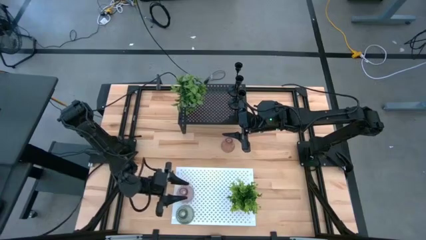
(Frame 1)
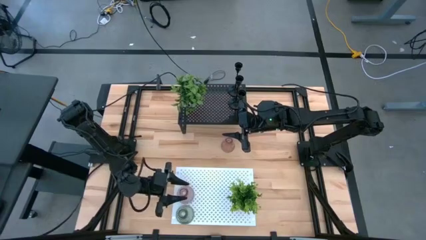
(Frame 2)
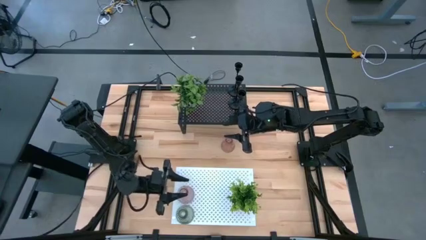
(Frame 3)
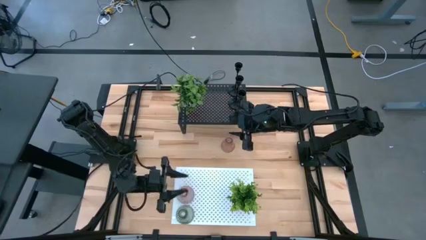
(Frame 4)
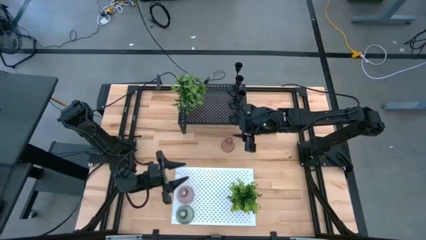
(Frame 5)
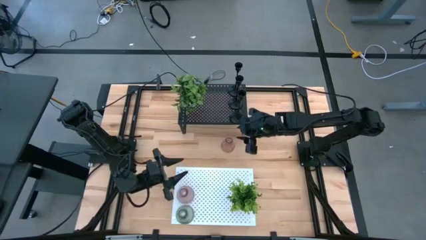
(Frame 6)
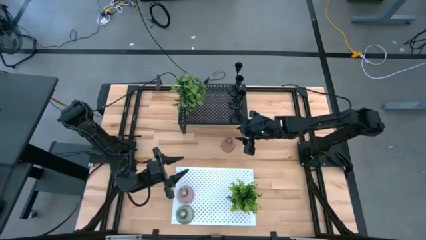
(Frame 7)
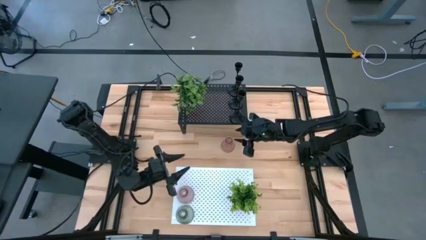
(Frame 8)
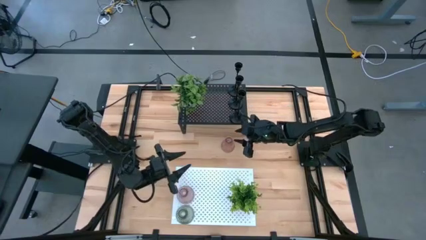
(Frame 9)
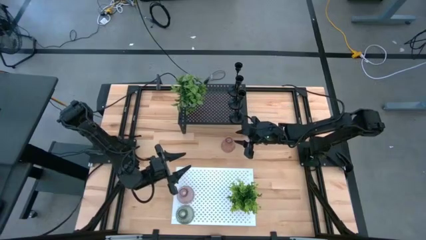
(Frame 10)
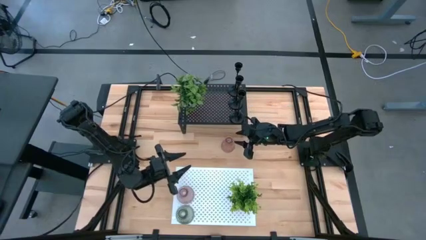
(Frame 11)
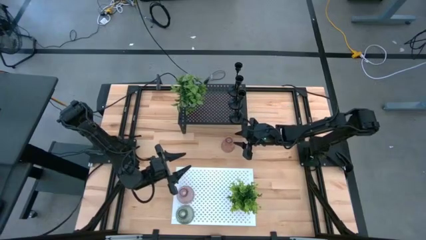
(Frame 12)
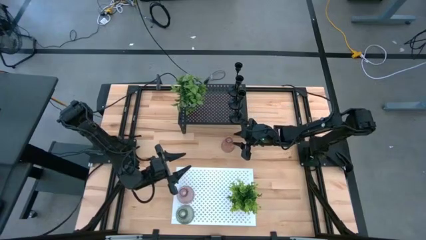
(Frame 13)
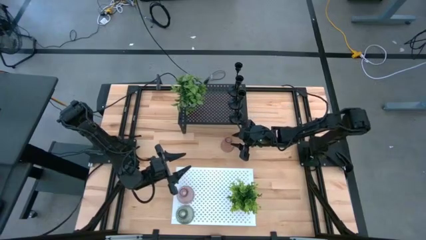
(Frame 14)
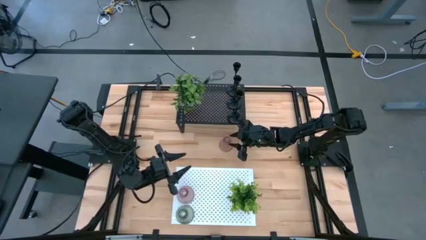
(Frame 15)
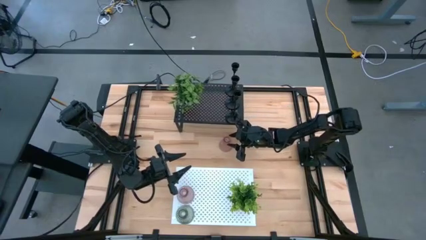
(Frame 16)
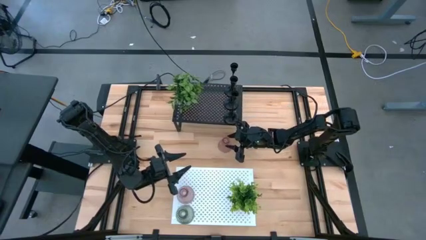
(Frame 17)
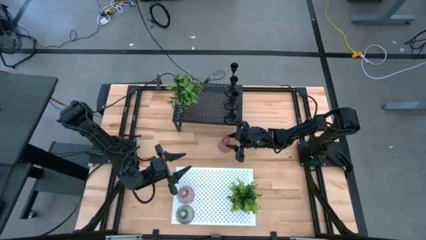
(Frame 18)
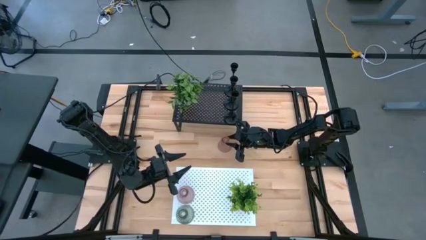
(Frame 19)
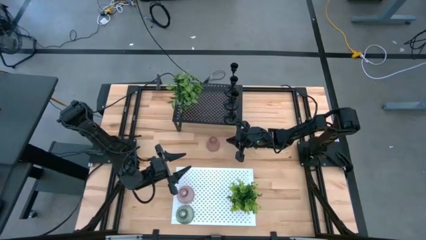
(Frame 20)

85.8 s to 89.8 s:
Task: Pick & Place candle stick holders
Put the small pink glass candle holder on the white shelf aligned with the other small pink glass candle holder

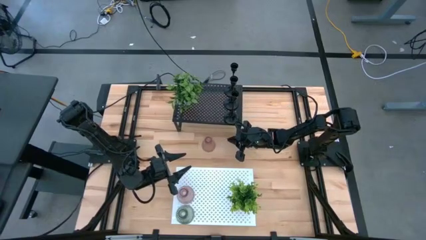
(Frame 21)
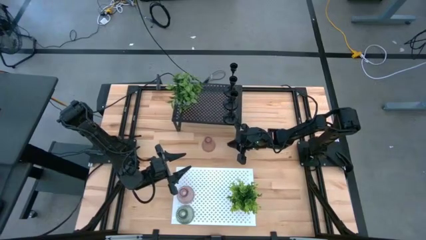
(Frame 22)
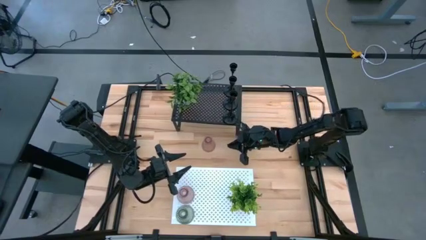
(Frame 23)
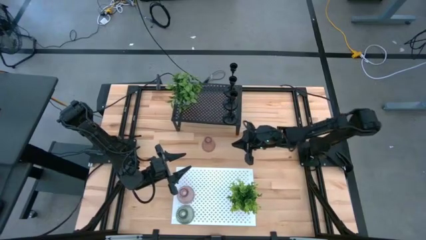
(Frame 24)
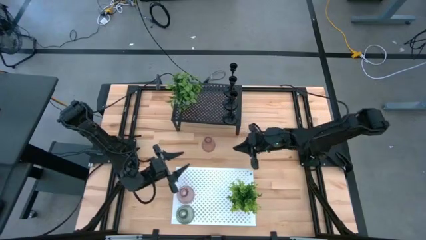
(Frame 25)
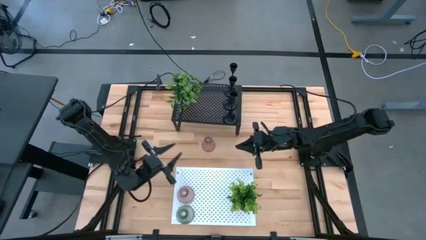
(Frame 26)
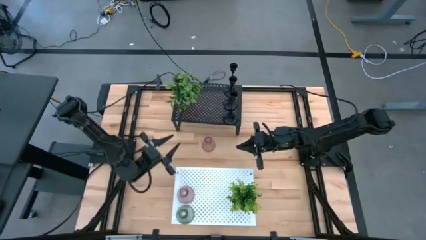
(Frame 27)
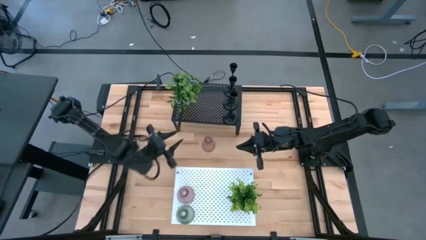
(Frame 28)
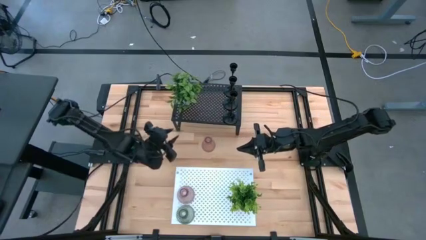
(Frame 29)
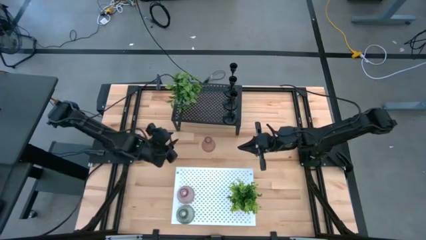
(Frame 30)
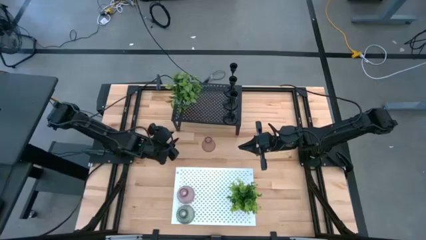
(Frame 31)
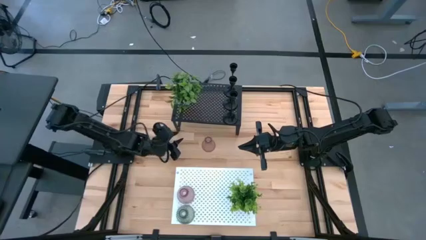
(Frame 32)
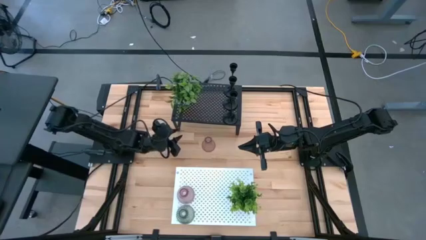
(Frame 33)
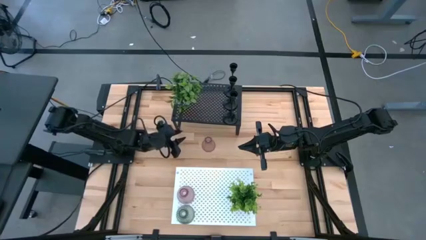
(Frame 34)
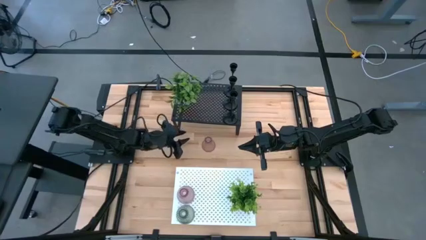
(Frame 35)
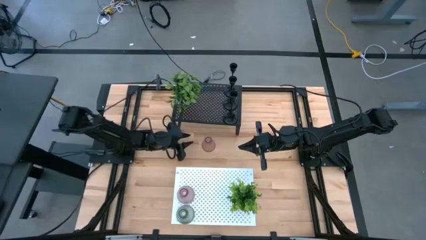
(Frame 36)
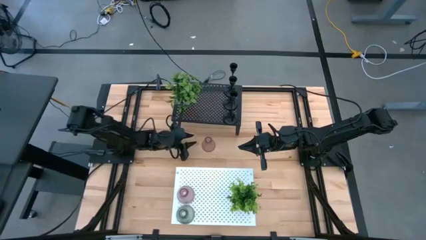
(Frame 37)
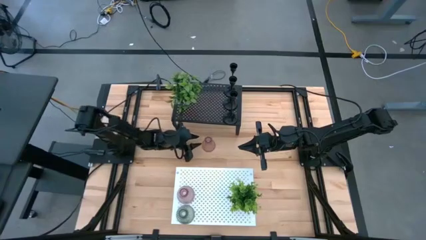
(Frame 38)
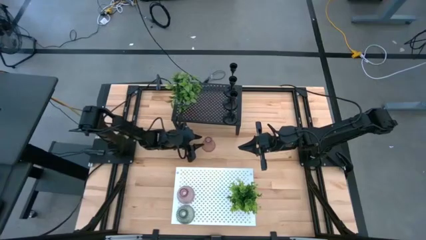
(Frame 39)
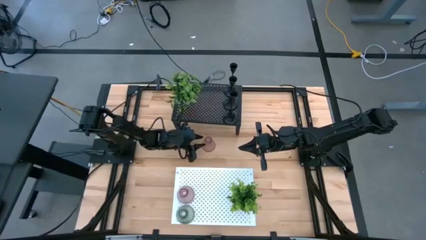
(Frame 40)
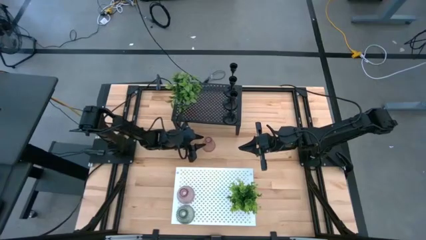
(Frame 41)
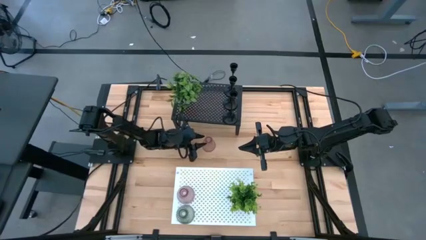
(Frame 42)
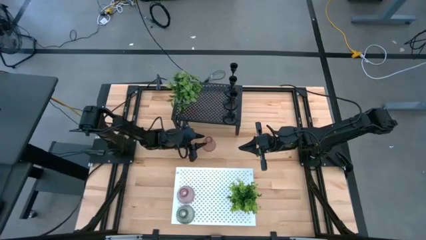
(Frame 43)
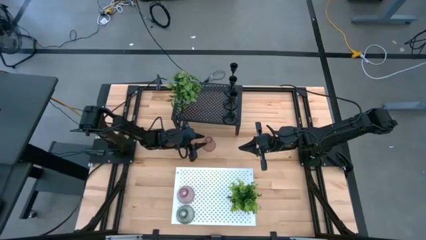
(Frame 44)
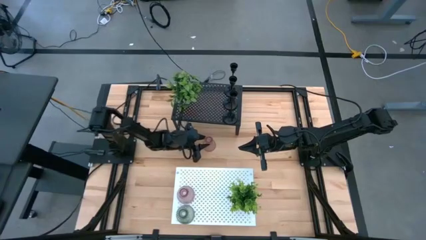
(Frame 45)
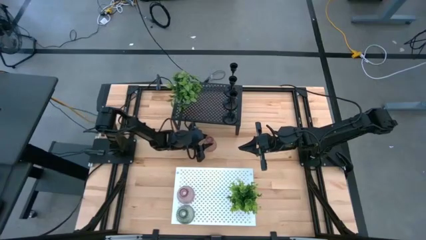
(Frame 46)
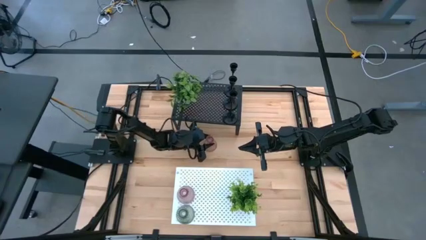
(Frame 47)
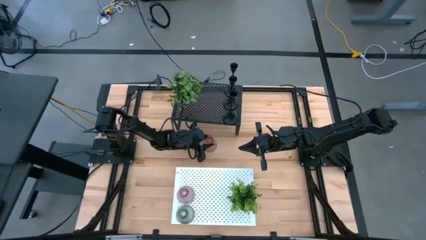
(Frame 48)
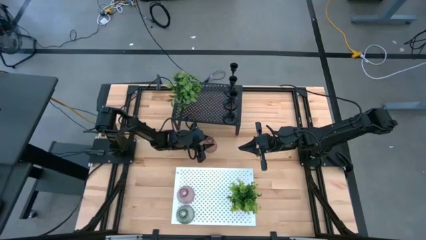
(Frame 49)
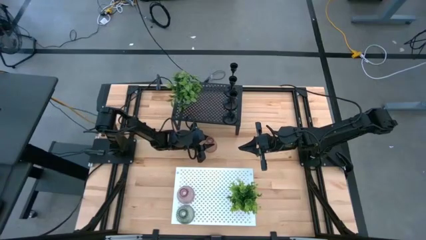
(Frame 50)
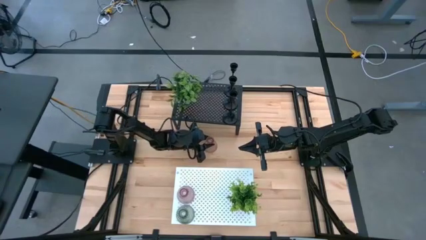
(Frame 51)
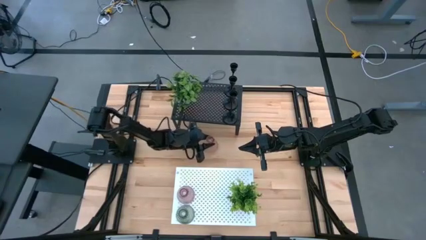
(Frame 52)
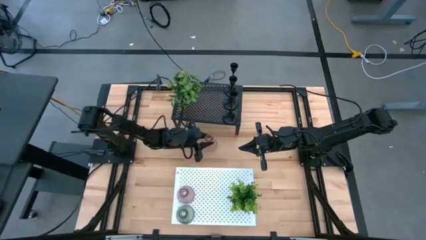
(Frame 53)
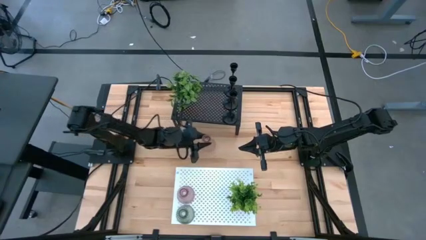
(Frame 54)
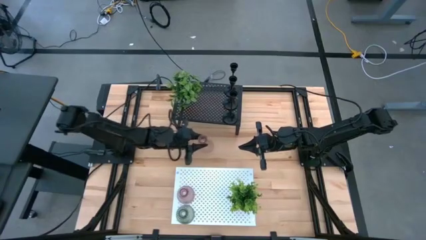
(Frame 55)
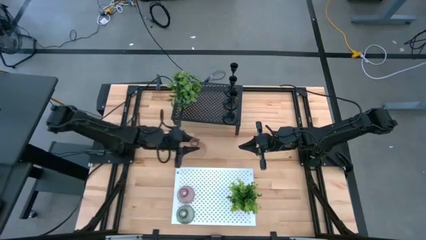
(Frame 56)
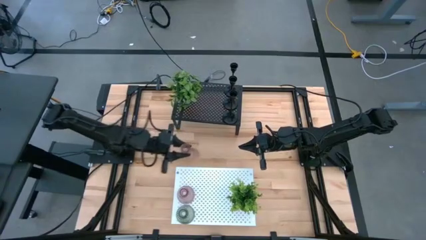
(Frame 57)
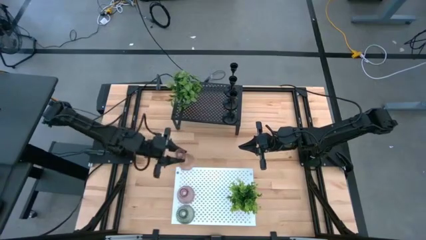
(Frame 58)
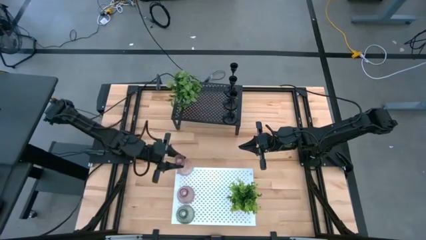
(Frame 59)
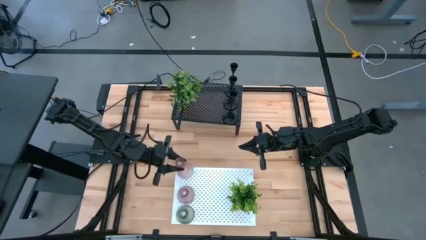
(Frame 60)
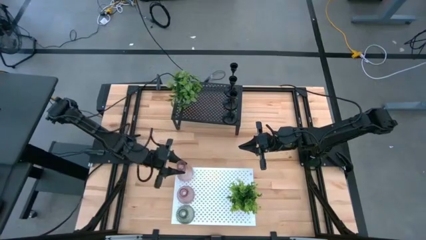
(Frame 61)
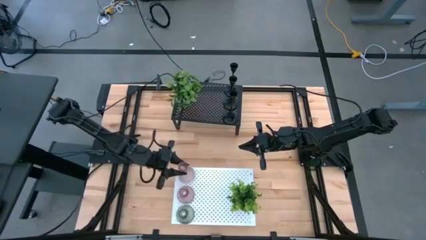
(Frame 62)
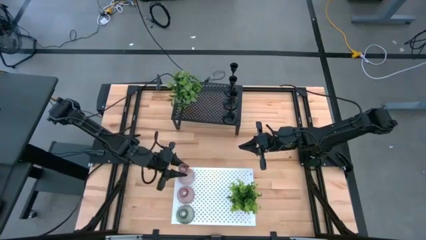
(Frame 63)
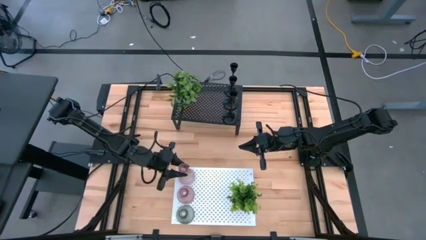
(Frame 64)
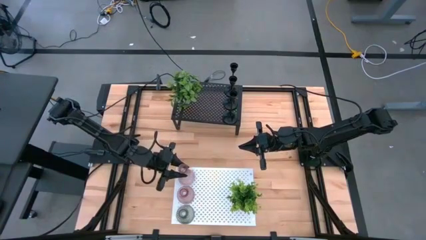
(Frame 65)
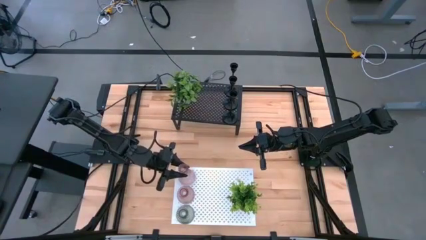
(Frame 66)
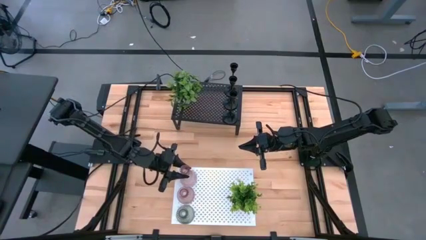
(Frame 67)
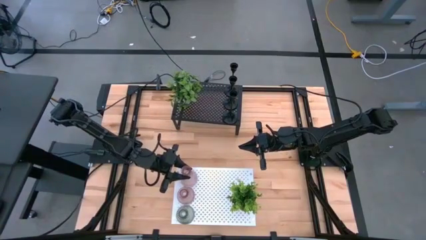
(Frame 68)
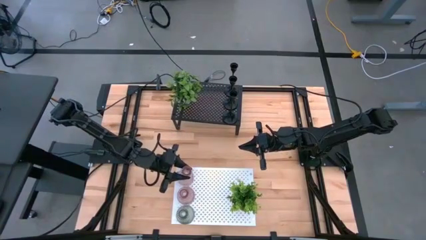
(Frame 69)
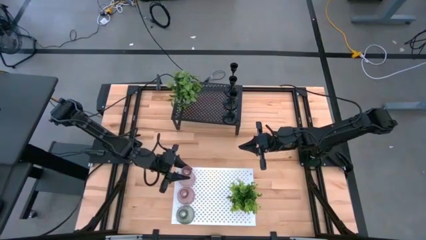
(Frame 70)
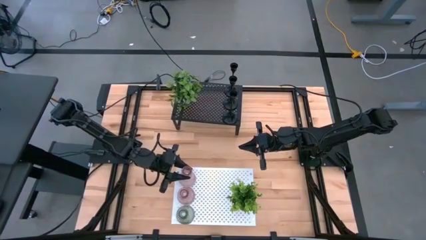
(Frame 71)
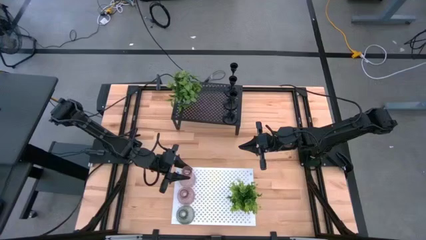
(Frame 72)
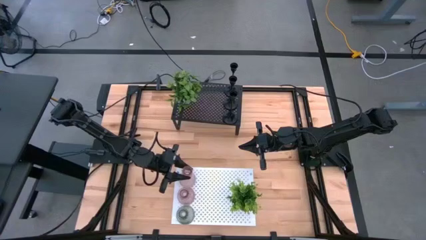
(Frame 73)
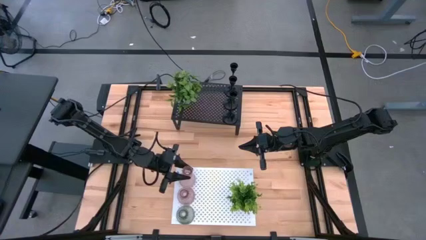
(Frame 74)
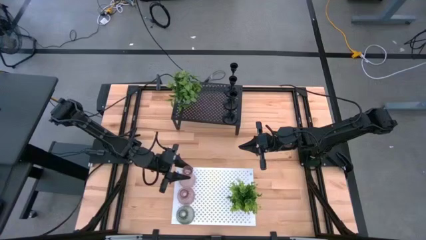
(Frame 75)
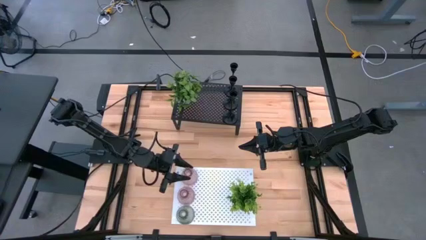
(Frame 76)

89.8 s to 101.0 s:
Put the small pink glass candle holder on the white shelf aligned with the other small pink glass candle holder
